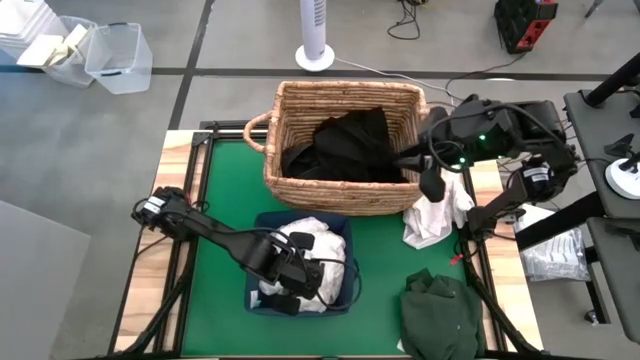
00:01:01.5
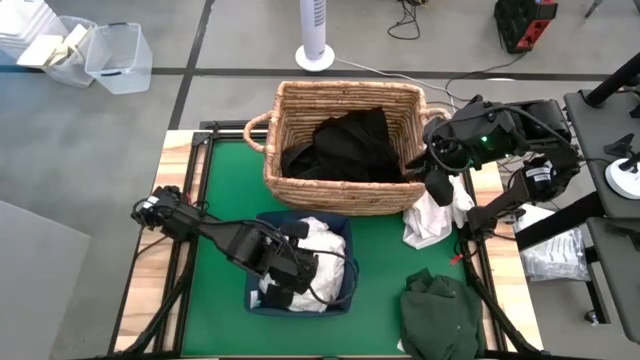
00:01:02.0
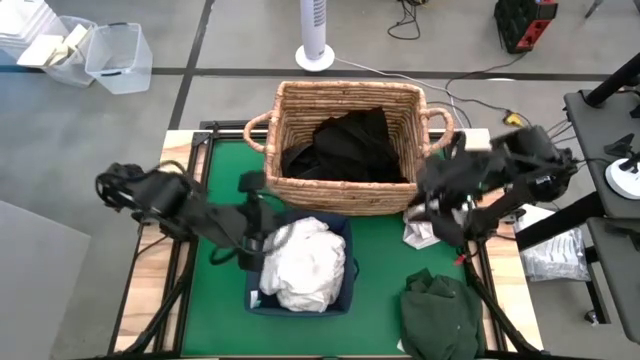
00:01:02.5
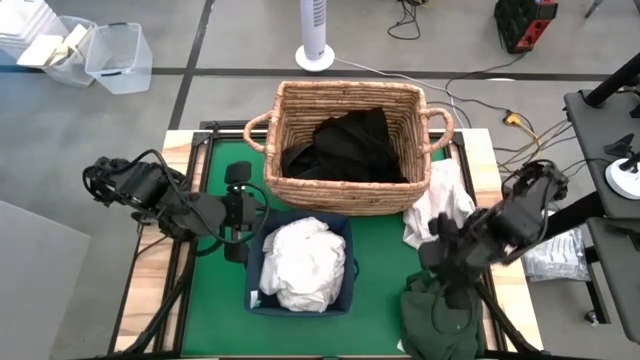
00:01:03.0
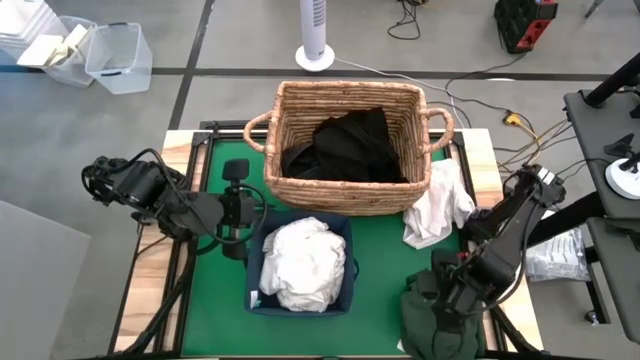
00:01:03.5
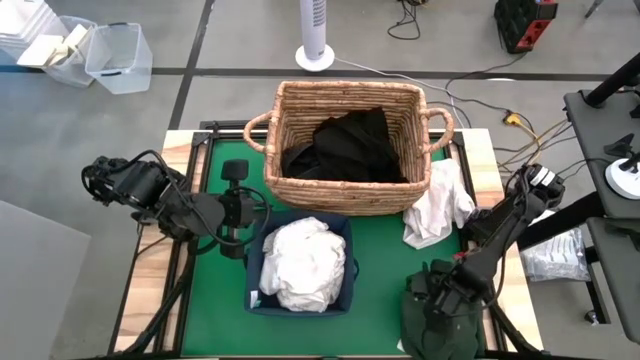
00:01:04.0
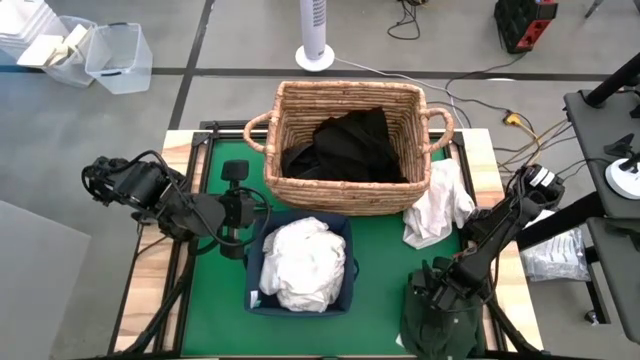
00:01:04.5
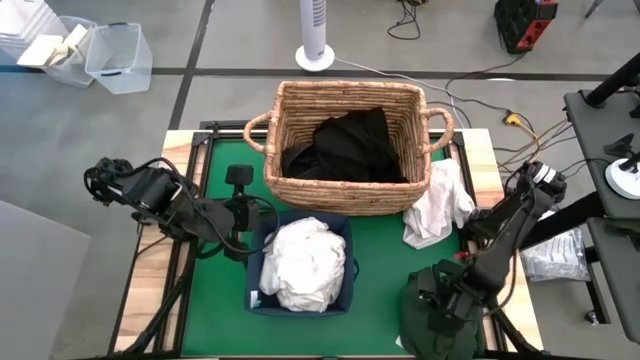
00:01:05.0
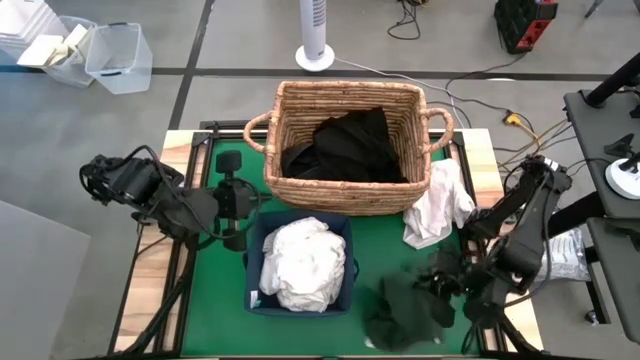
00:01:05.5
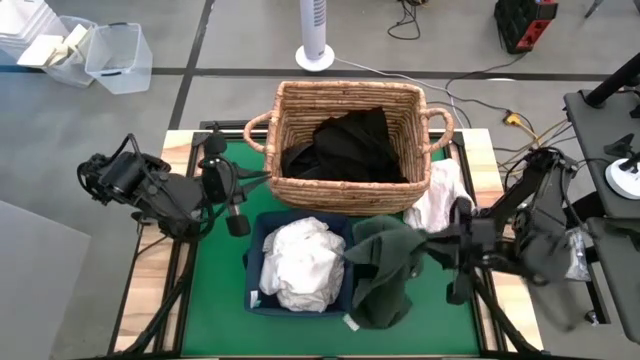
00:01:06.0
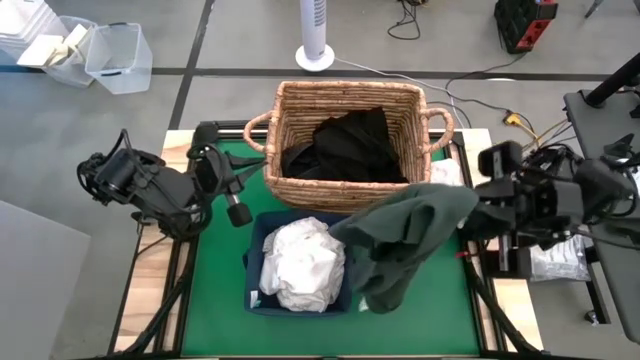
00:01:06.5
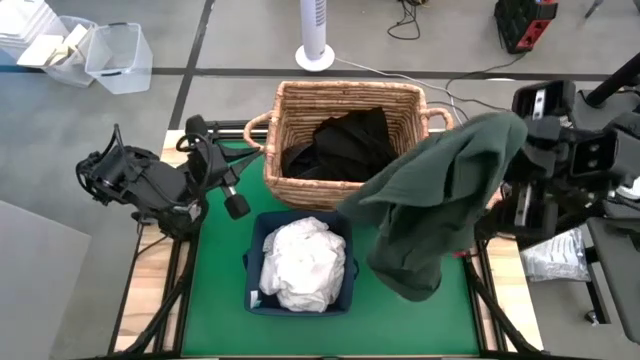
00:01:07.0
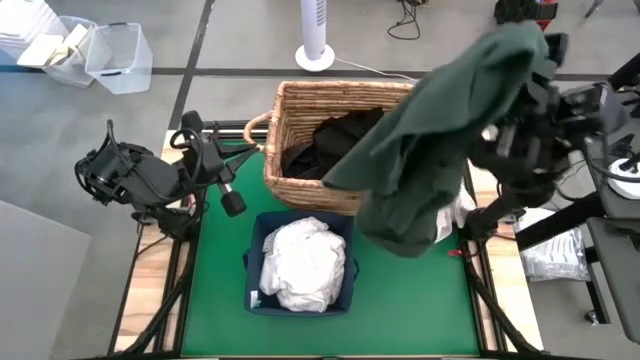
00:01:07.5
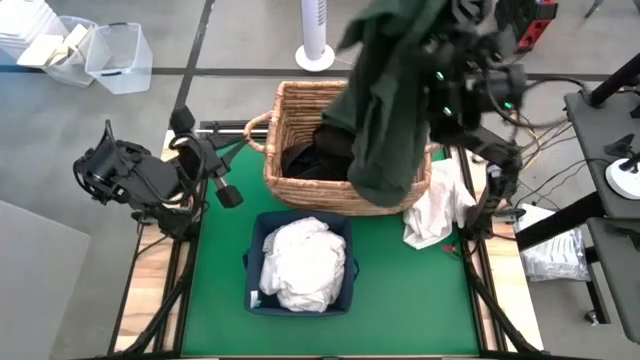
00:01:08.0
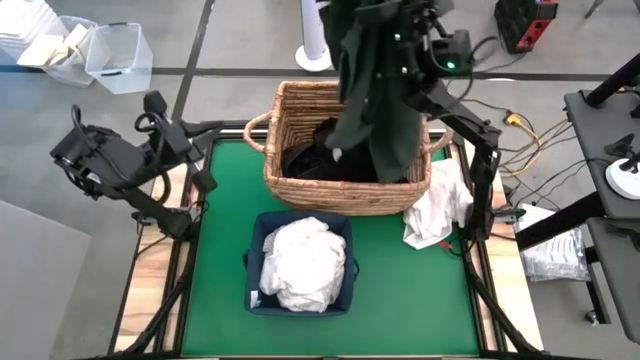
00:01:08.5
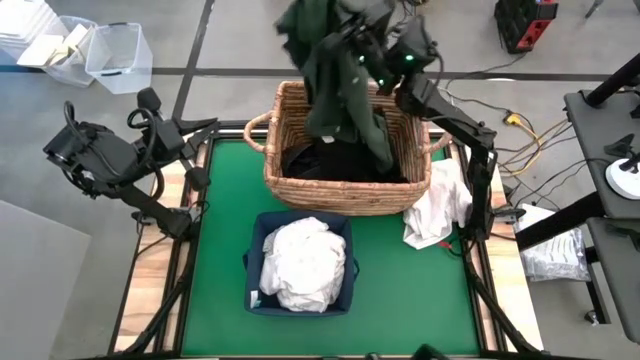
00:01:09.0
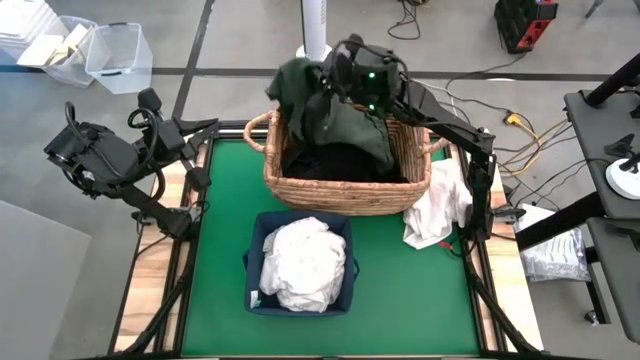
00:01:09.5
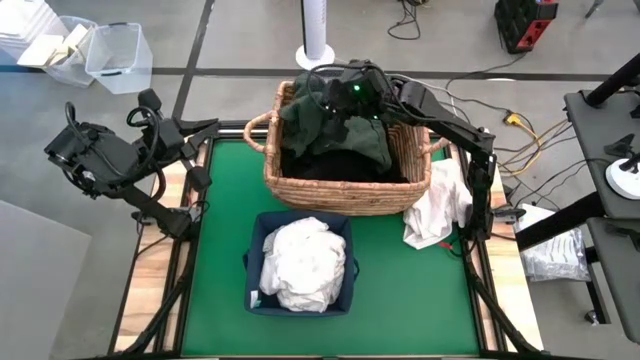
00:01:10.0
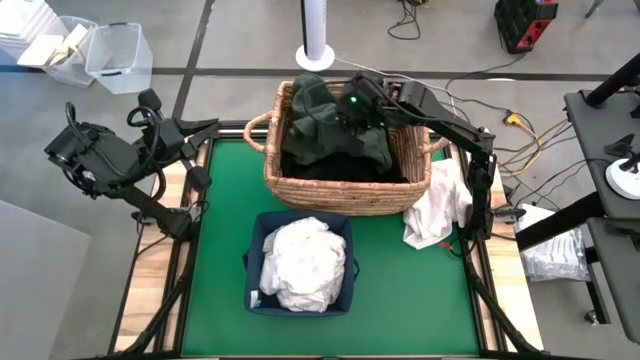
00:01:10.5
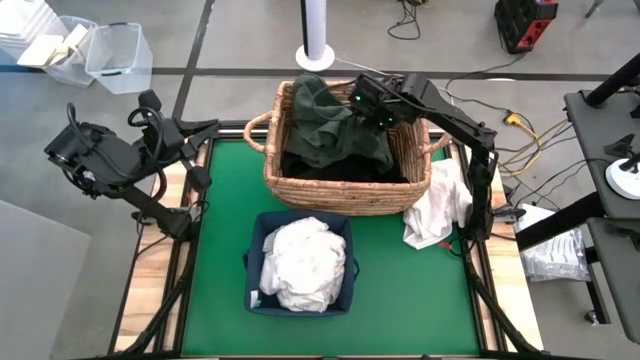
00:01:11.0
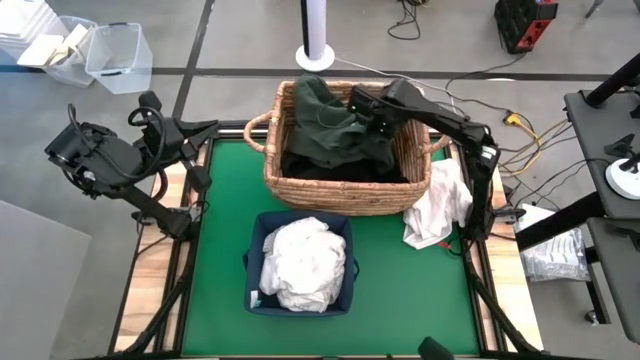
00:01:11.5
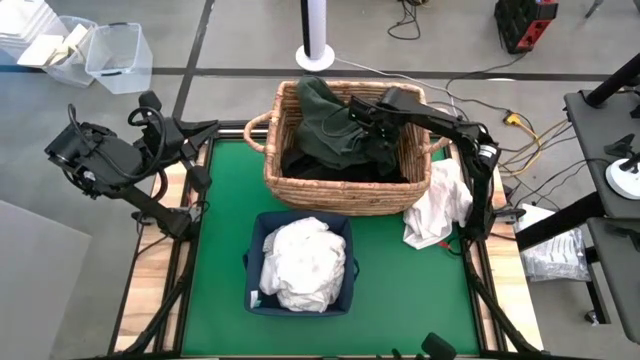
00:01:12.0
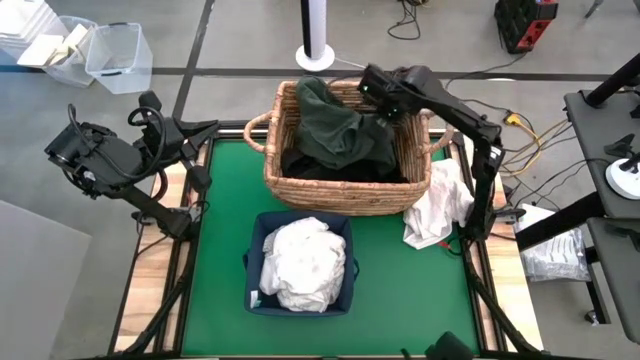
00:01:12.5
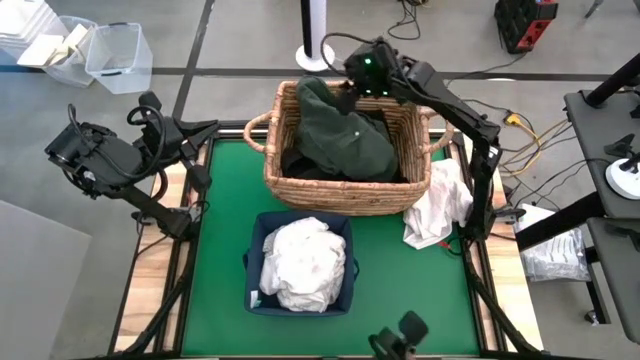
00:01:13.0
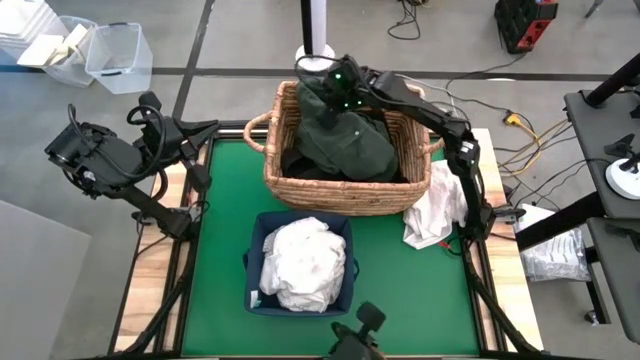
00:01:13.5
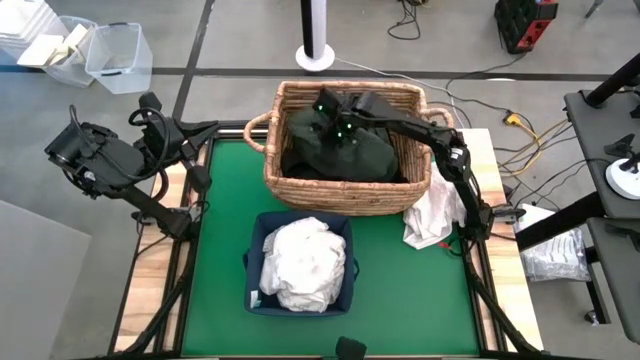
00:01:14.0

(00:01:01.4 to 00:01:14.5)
Put the green polo into the brown laundry basket

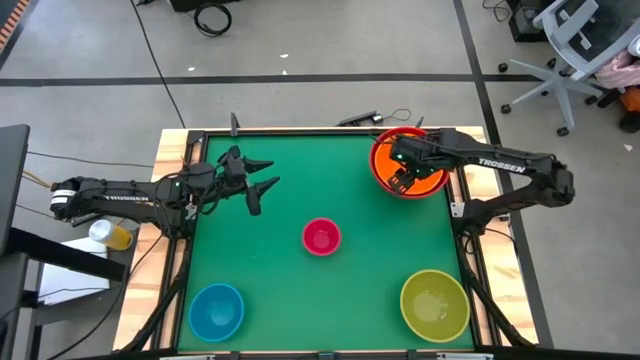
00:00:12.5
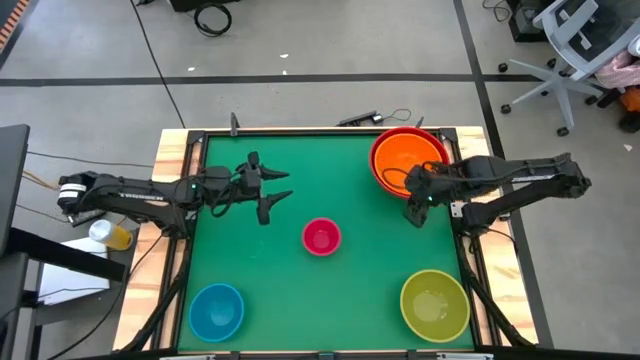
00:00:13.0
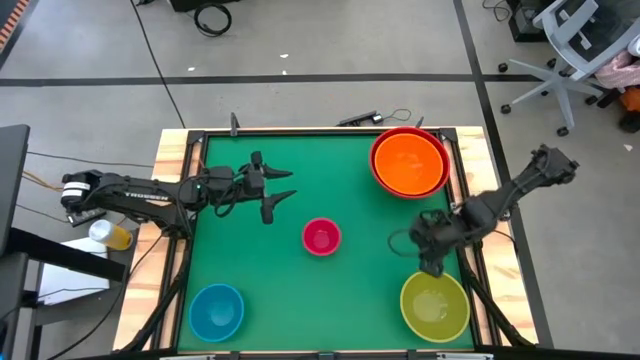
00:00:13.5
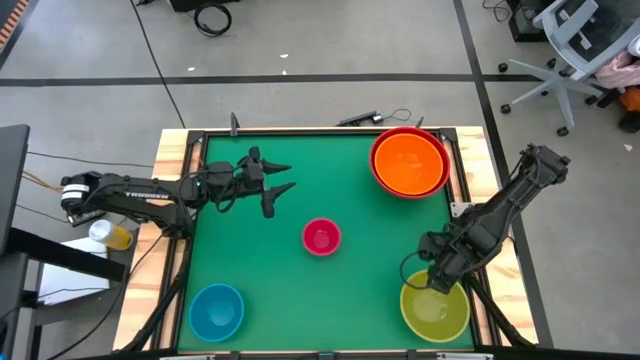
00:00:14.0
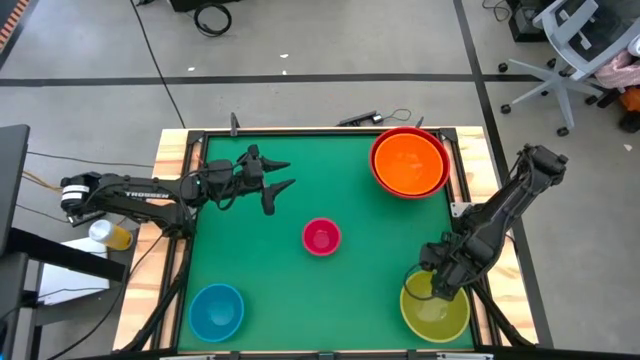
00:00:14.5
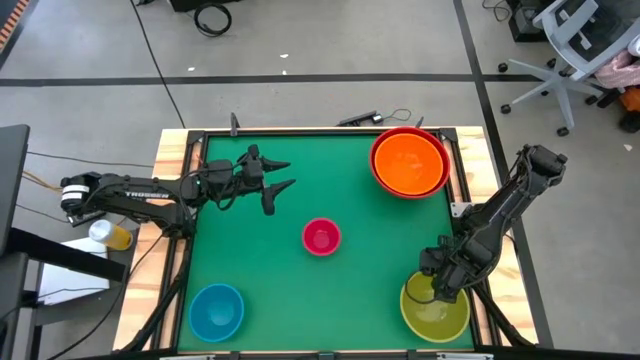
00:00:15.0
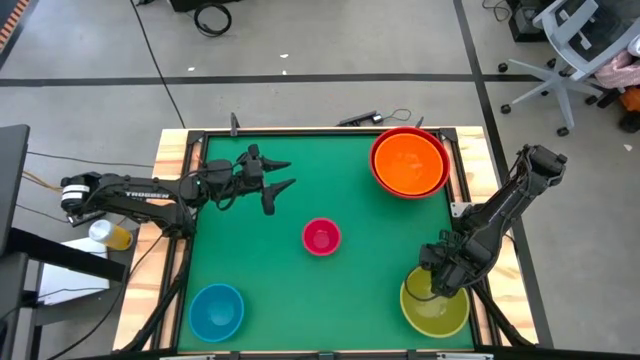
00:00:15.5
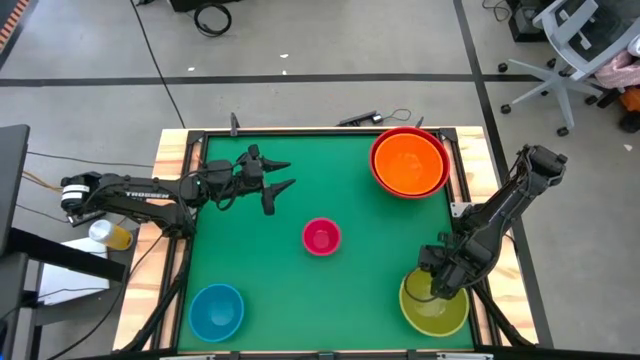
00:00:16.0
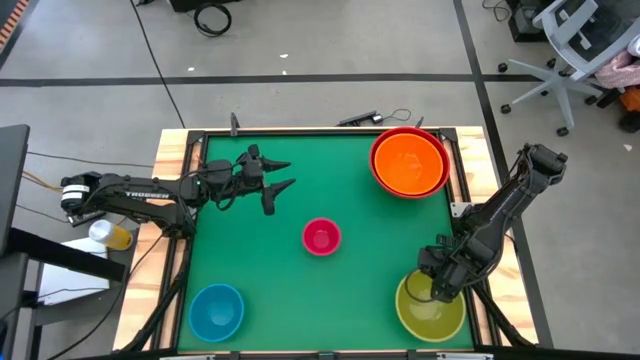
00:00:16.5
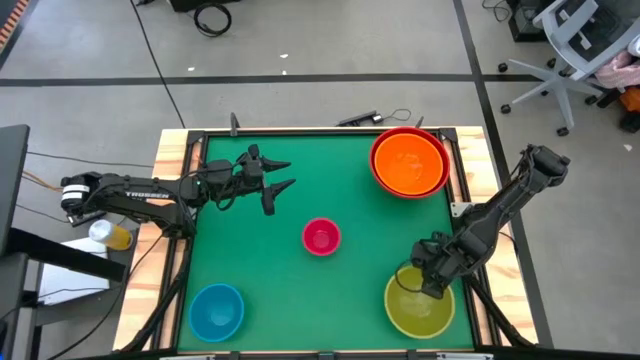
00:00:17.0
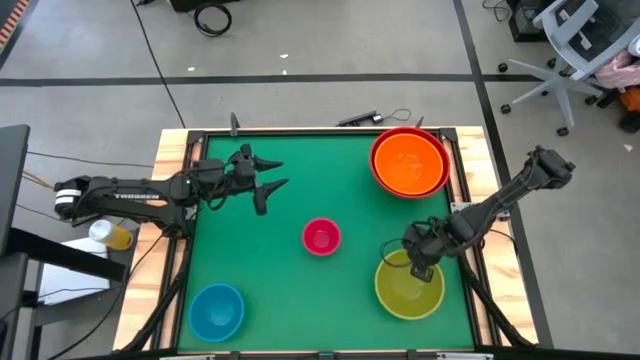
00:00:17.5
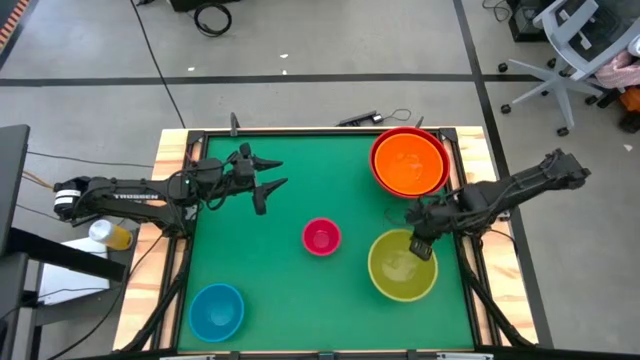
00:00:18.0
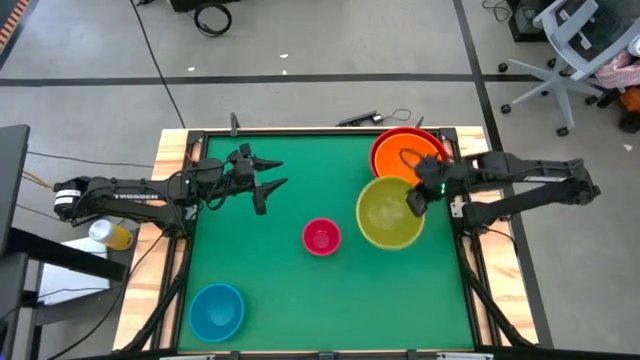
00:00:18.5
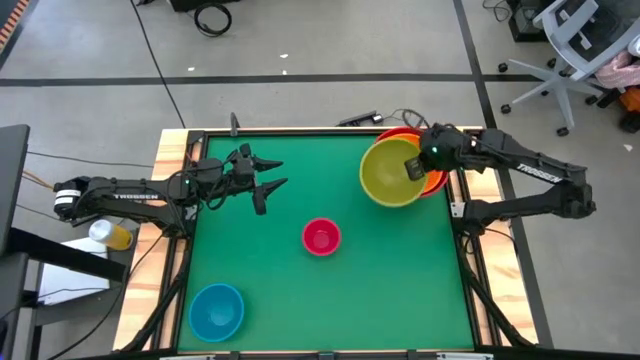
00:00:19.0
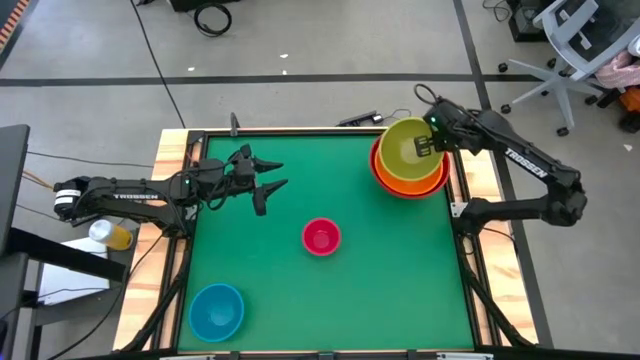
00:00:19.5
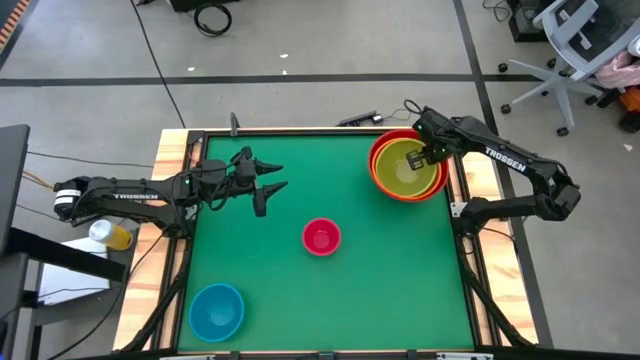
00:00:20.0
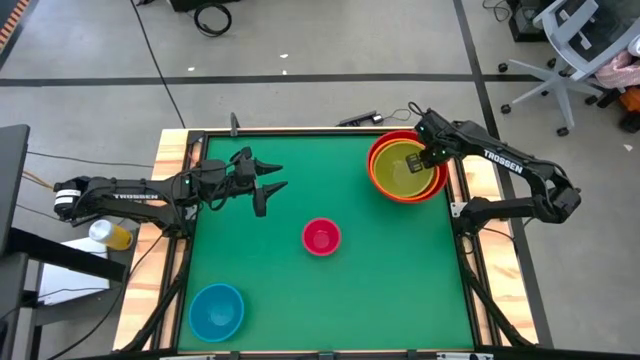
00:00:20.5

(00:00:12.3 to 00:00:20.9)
Stack the green bowl on top of the orange bowl
